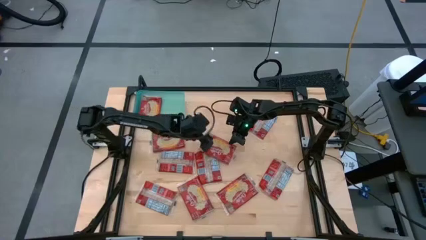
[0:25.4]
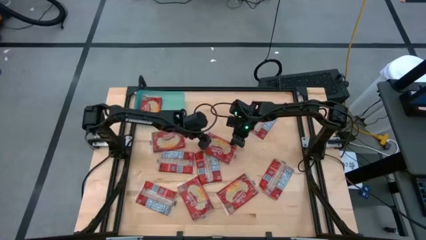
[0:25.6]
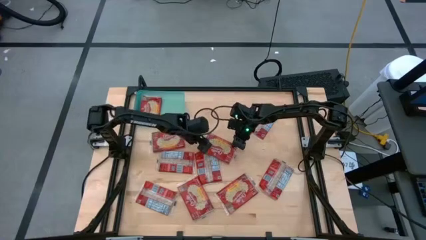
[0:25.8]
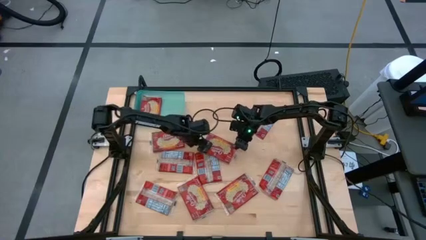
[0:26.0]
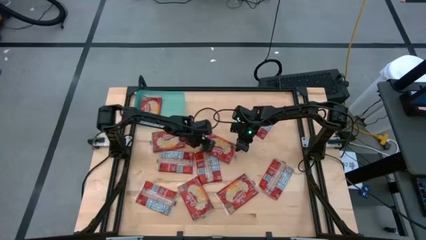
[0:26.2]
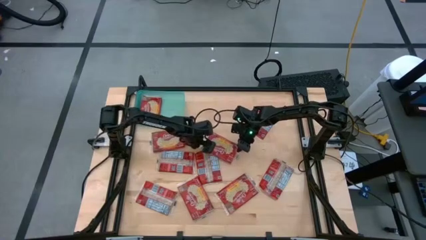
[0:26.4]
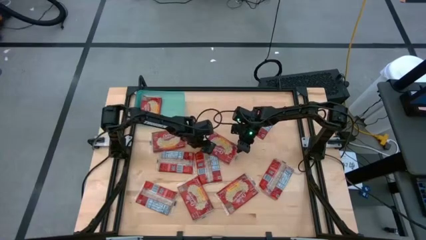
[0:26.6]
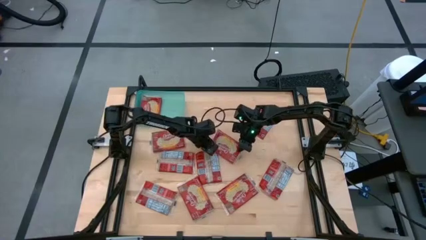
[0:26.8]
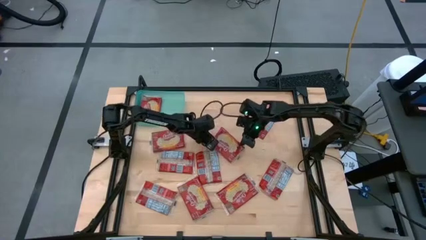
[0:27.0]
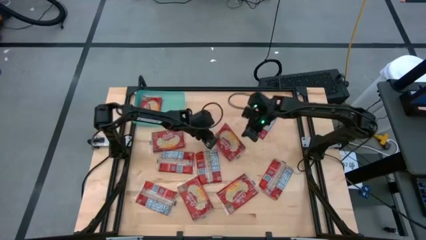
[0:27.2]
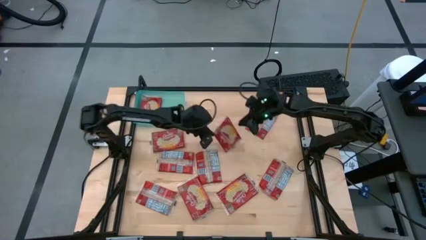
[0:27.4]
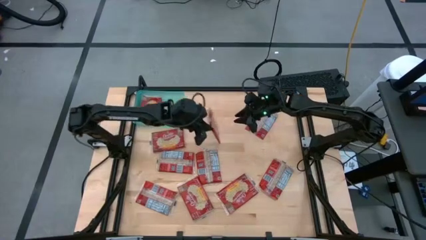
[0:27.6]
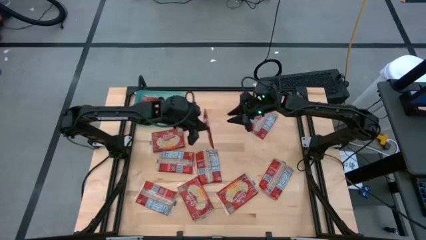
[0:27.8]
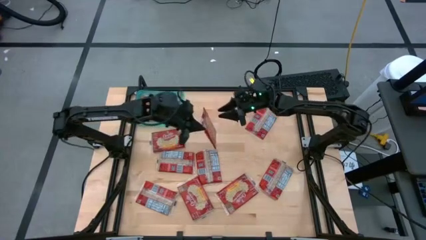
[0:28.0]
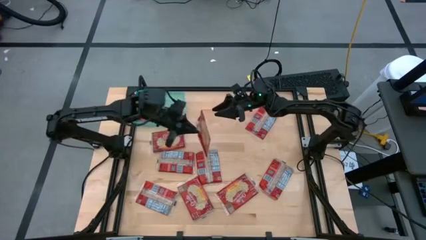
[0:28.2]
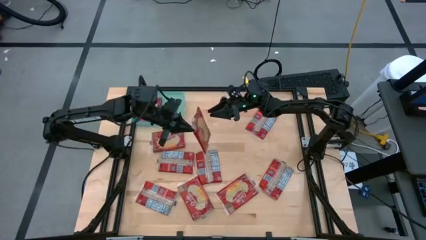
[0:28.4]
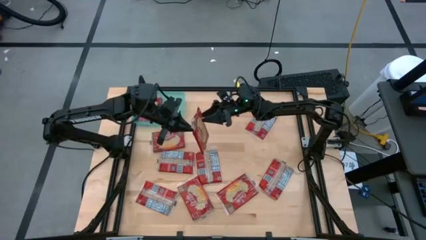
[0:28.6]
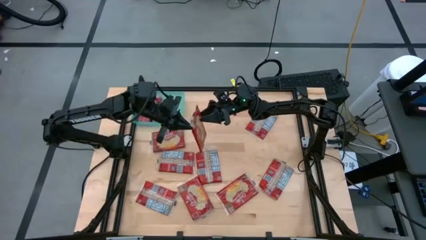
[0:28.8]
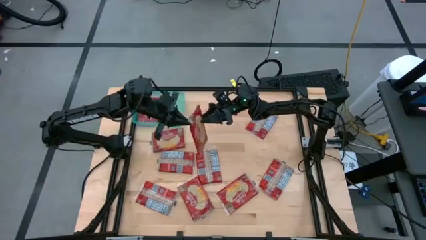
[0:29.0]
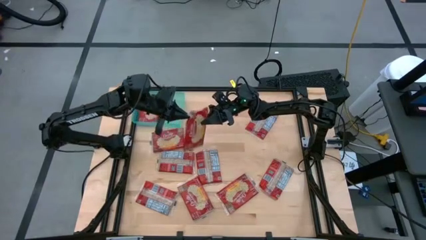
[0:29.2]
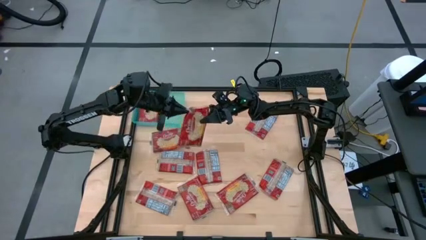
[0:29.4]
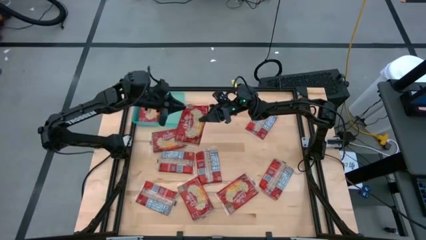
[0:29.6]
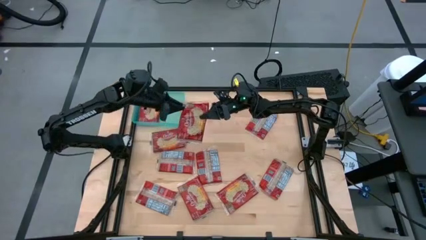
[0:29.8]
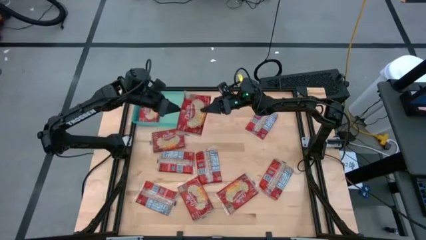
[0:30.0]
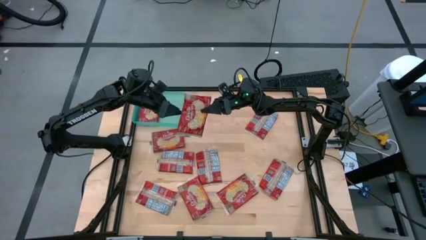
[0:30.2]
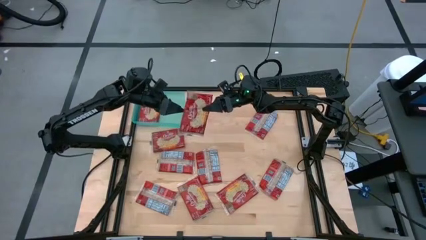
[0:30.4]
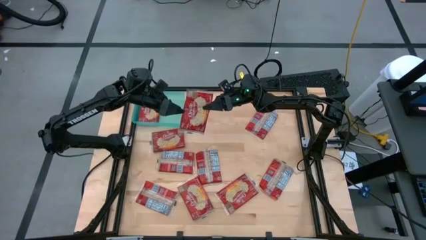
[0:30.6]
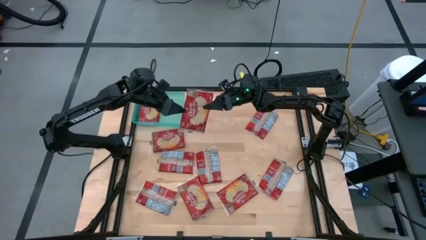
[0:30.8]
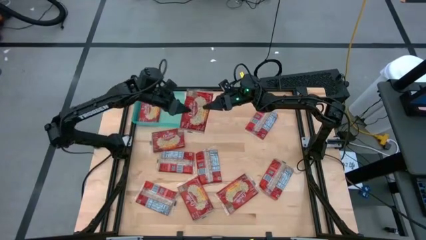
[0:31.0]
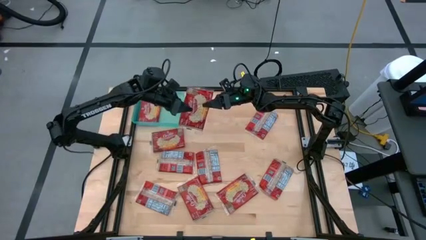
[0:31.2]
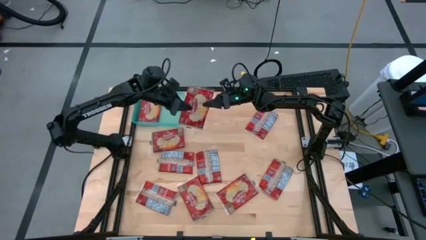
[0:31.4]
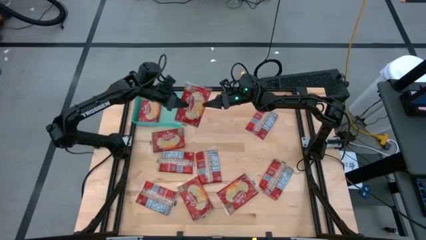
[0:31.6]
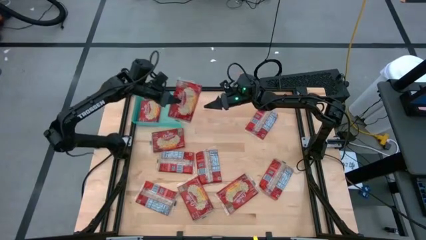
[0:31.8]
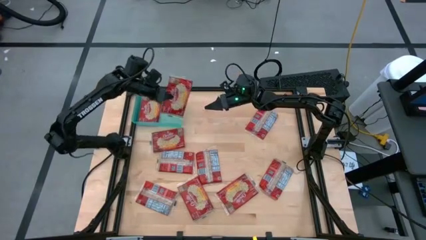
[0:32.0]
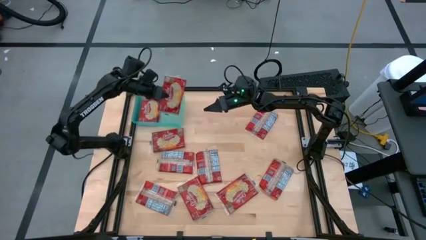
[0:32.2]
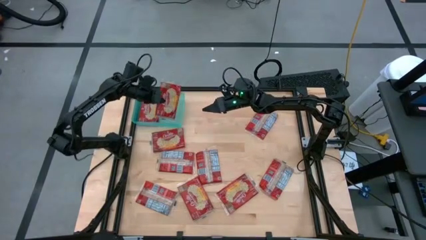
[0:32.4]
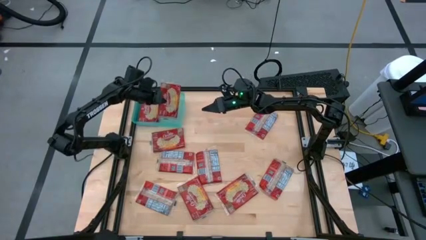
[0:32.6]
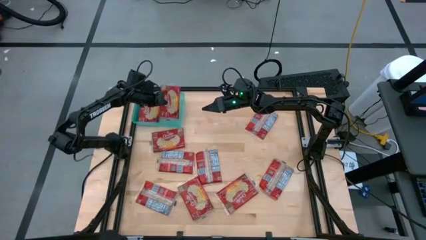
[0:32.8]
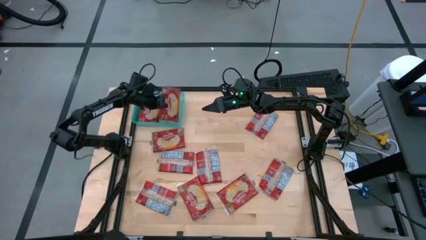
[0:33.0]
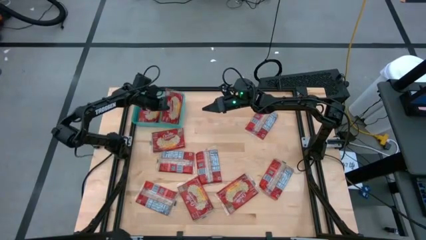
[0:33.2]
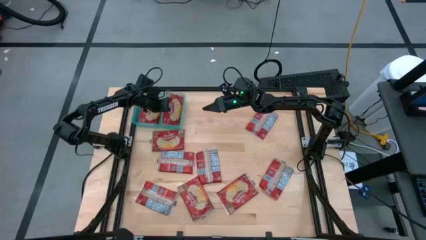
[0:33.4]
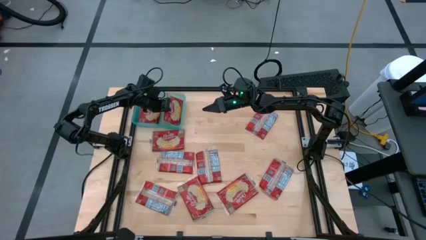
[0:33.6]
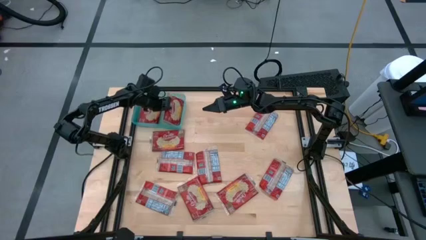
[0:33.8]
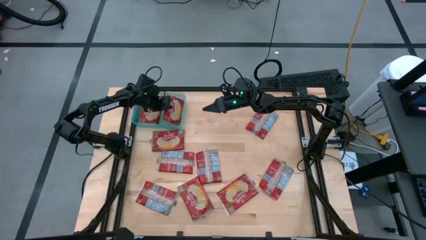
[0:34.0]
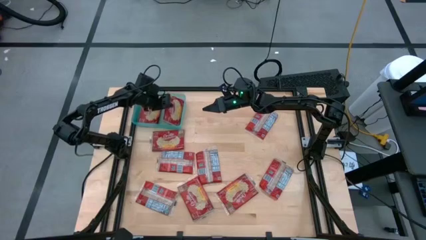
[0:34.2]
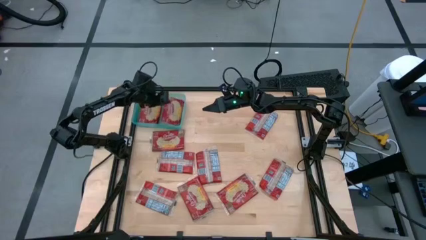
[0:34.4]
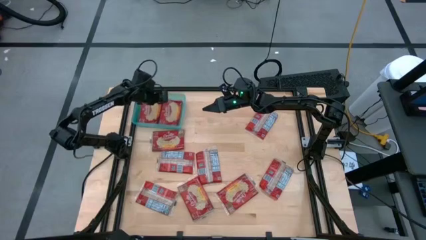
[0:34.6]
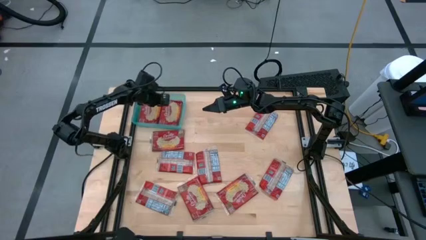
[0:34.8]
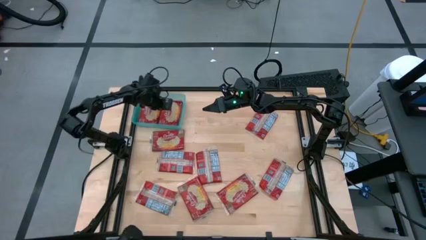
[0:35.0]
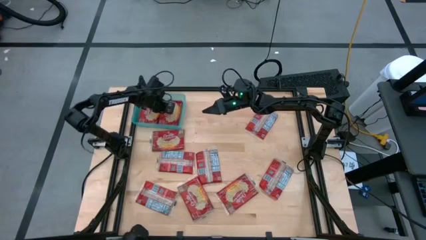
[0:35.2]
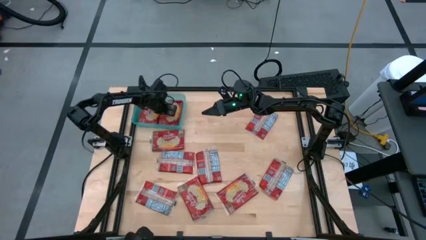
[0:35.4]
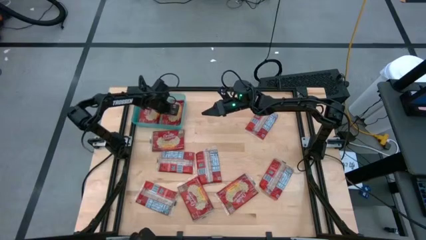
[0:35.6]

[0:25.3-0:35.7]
Task: Sort popcorn bags into baskets
Put the red popcorn bag into the blue bin

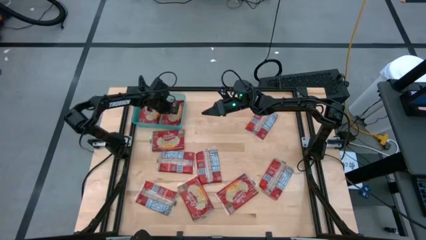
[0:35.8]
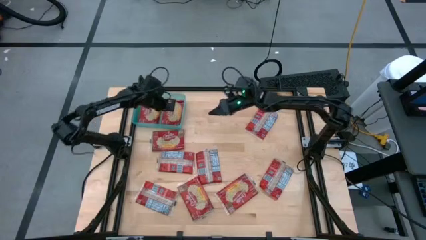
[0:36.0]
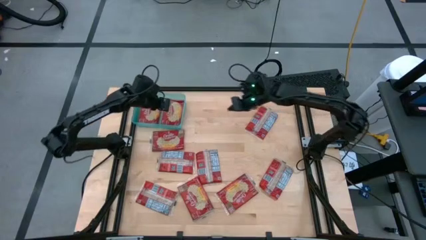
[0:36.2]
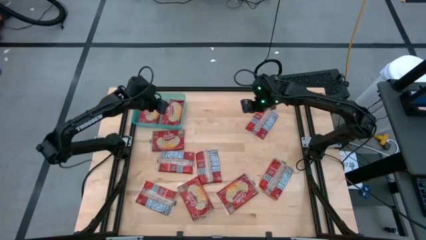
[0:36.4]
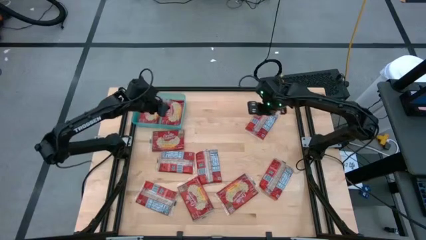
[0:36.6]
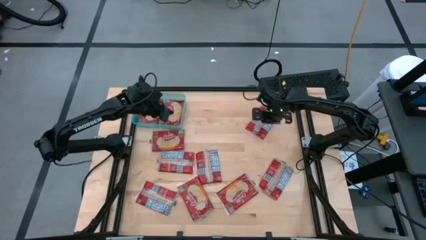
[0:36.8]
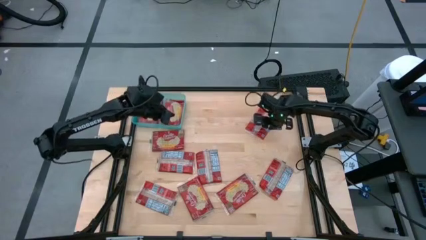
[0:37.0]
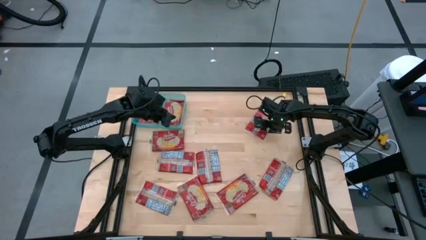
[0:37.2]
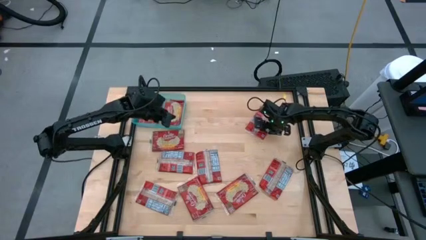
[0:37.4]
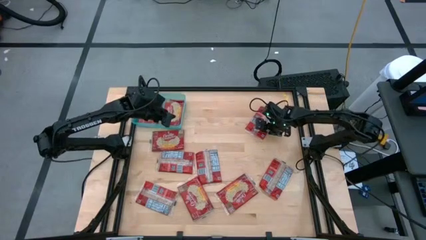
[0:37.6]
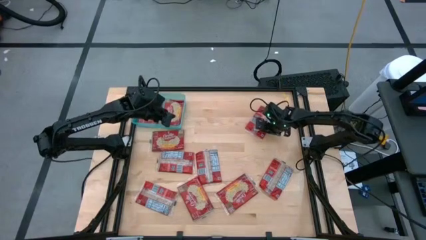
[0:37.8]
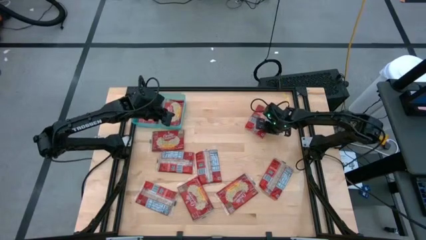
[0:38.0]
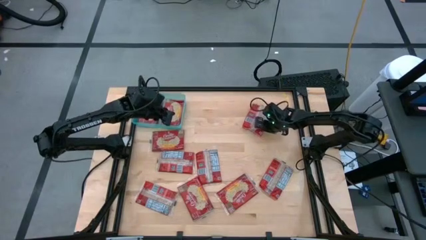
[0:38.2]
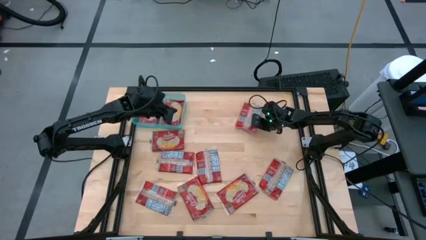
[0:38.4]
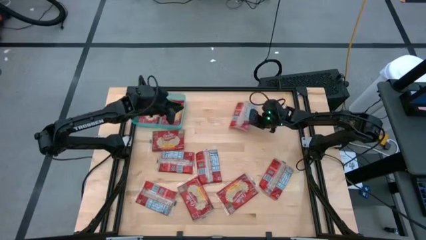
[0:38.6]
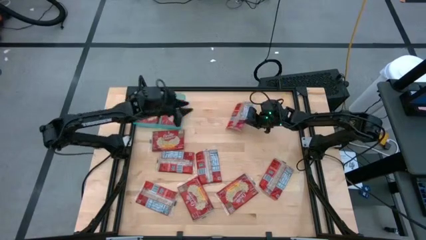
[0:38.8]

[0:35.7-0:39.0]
Put the red popcorn bag into the blue bin

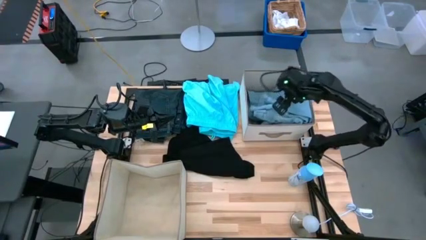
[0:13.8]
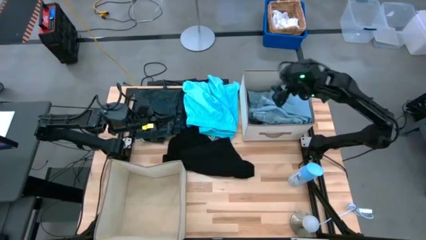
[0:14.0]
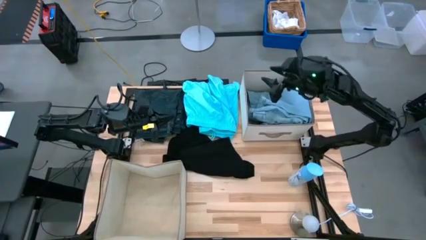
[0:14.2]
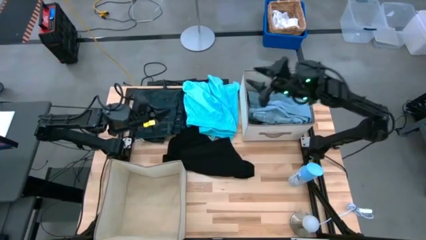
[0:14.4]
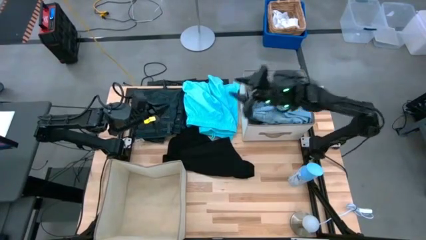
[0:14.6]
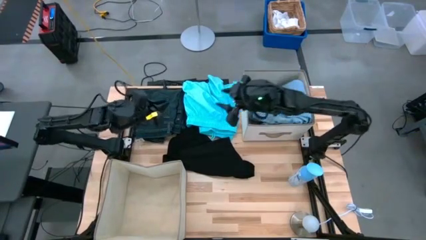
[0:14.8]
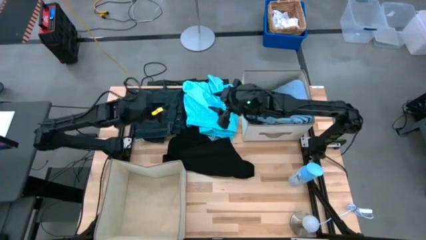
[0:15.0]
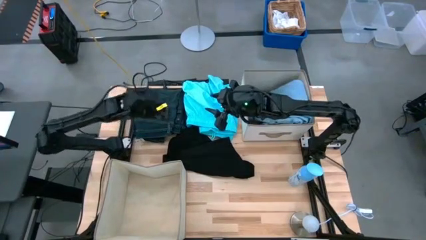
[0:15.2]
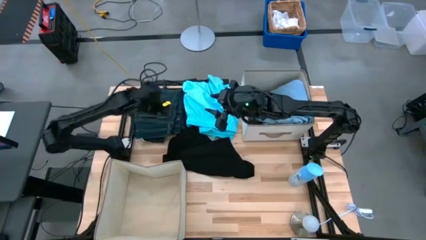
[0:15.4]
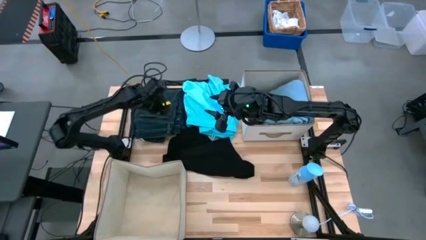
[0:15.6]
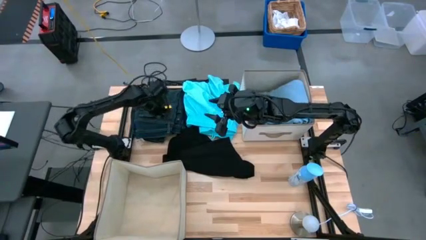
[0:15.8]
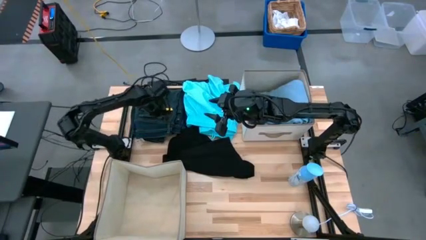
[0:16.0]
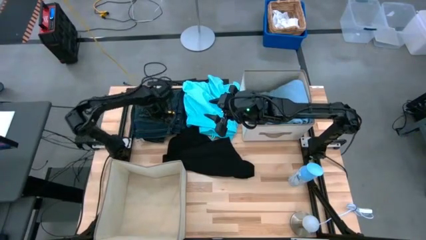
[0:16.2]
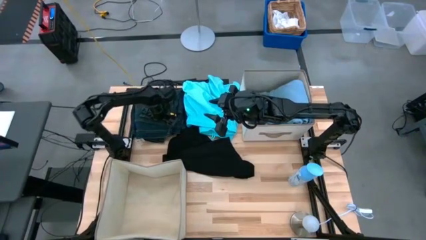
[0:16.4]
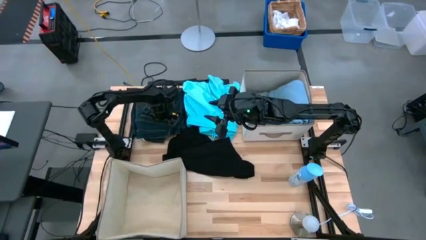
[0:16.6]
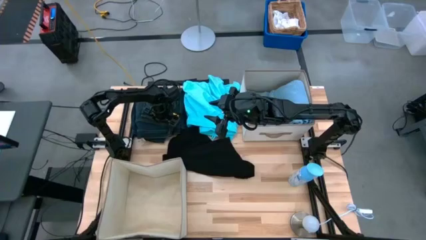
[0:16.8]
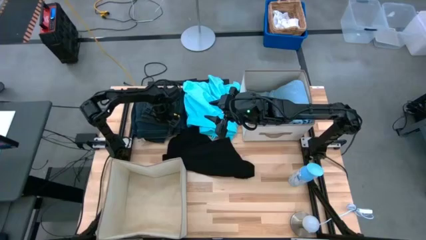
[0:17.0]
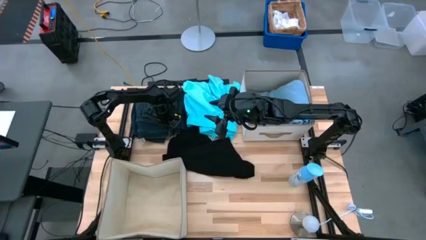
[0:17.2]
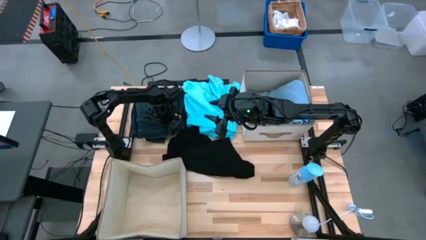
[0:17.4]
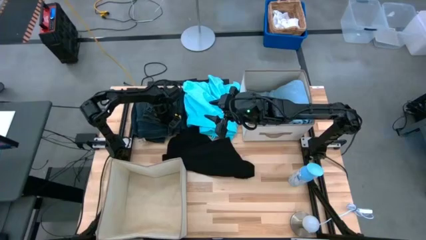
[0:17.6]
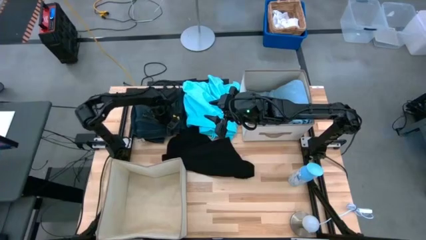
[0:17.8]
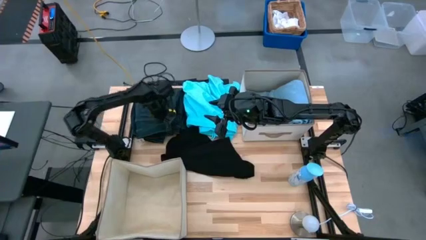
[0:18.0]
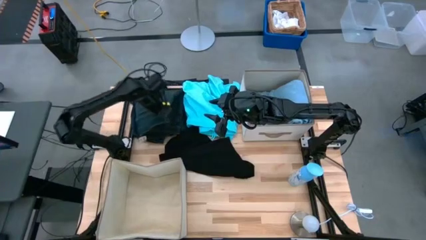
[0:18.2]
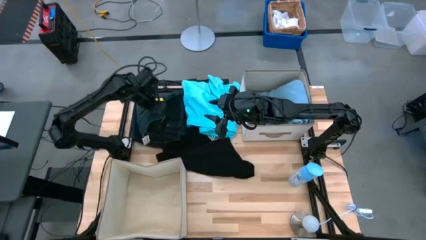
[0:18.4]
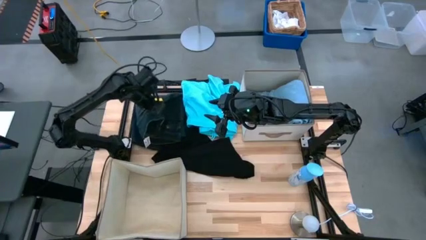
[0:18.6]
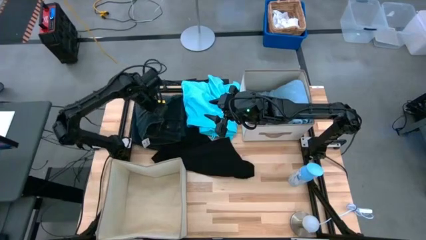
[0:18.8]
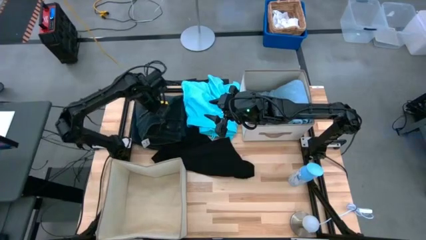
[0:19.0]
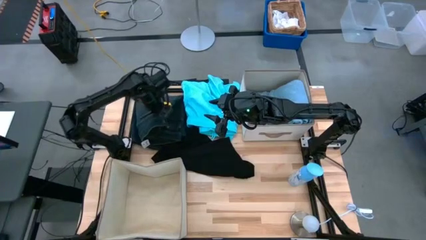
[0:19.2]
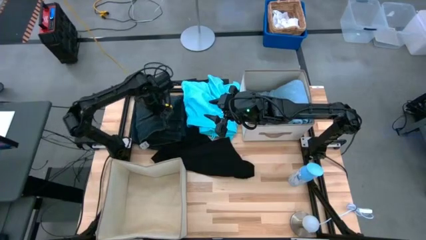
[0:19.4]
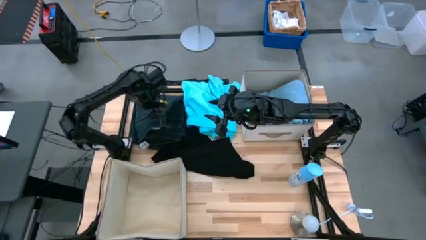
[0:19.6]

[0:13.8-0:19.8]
Task: Sort clothes
Put the dark blue pants into the bottom laundry bin
